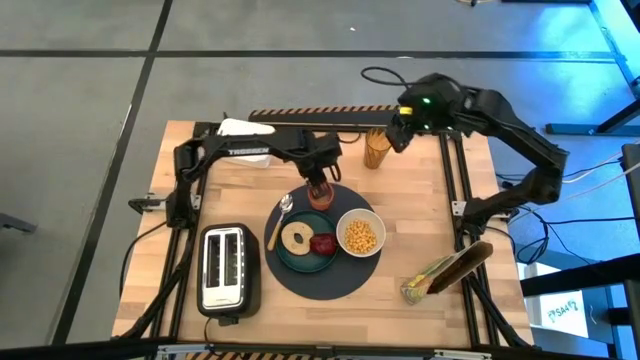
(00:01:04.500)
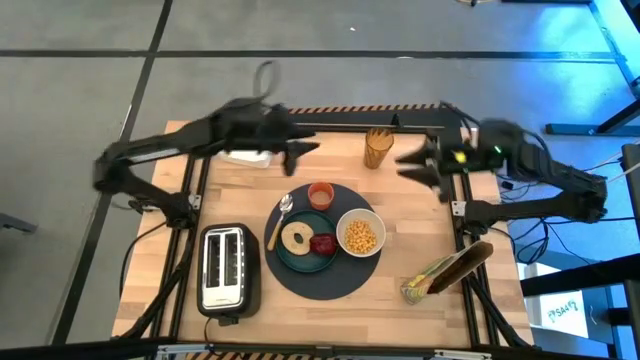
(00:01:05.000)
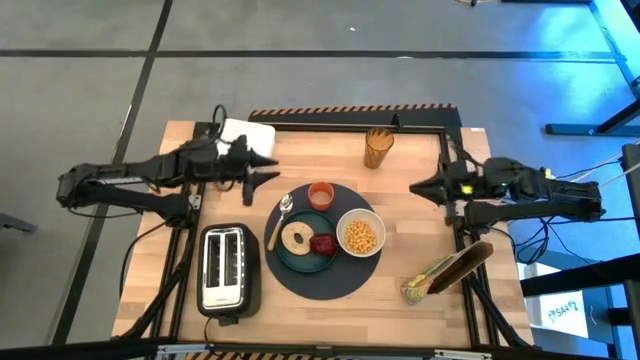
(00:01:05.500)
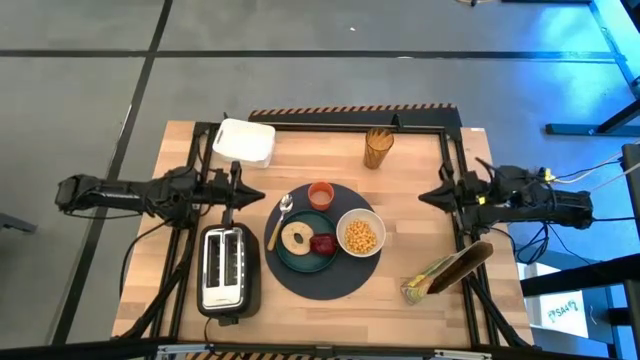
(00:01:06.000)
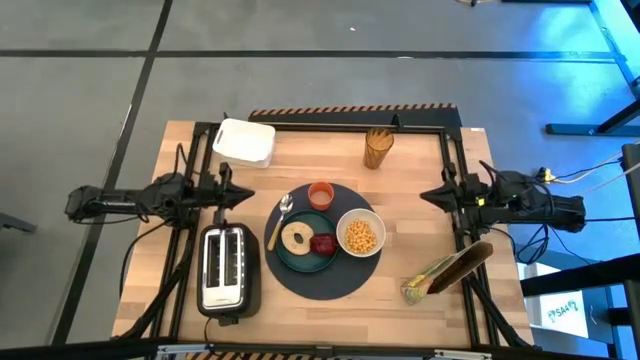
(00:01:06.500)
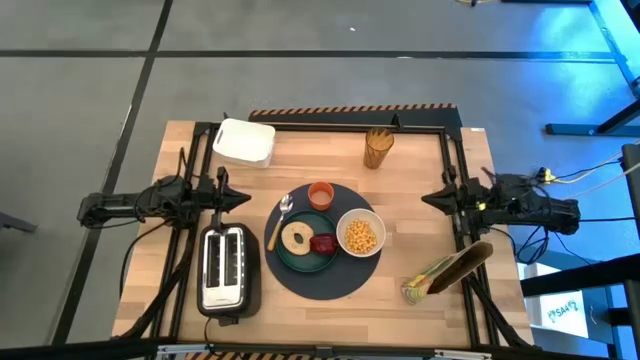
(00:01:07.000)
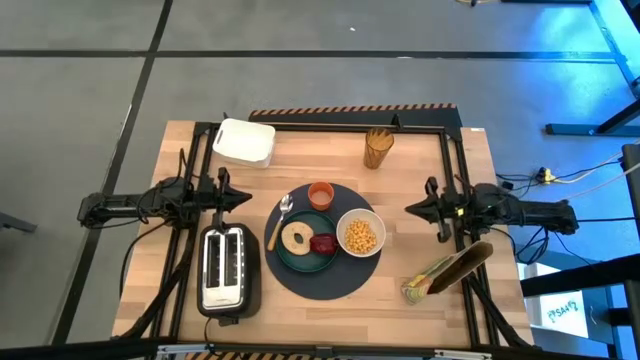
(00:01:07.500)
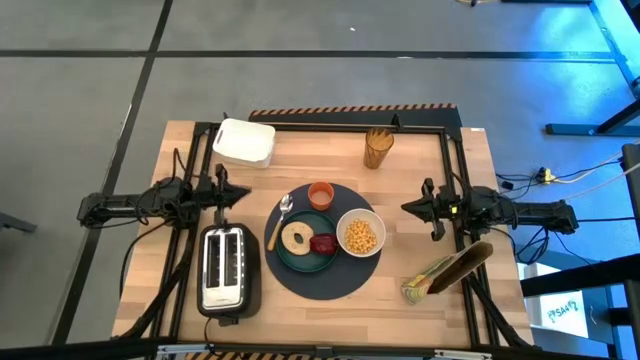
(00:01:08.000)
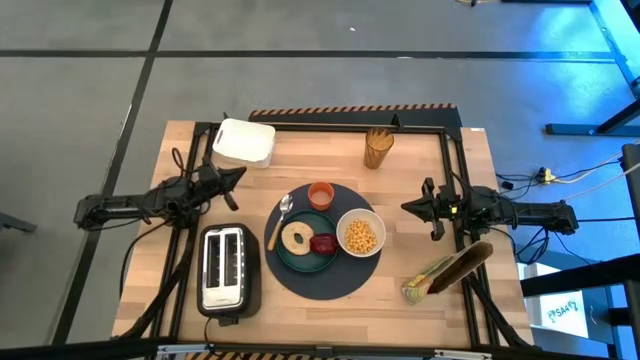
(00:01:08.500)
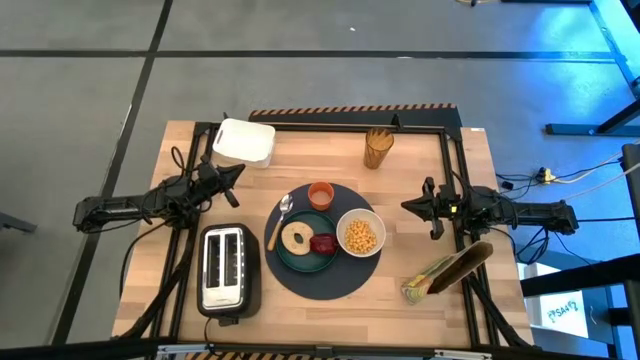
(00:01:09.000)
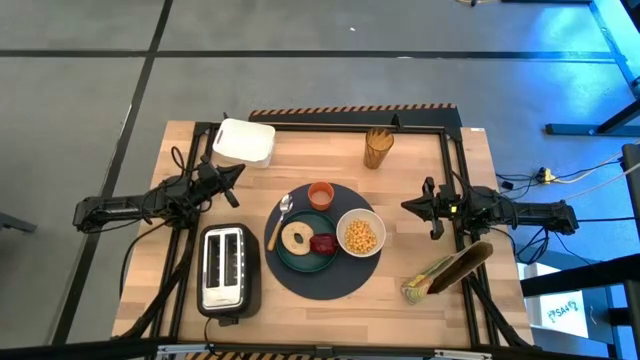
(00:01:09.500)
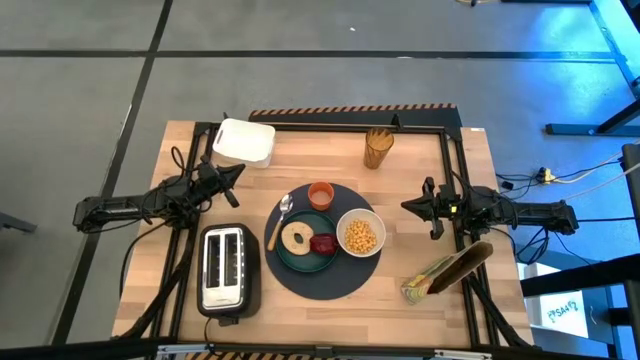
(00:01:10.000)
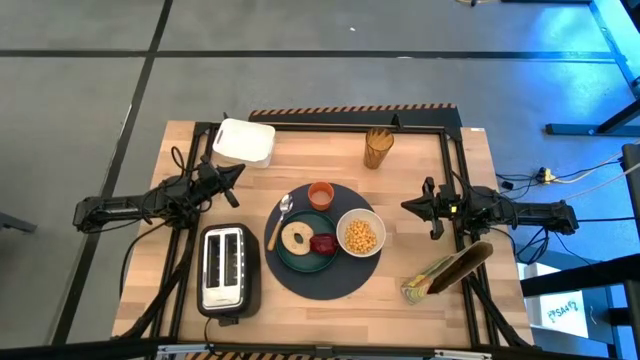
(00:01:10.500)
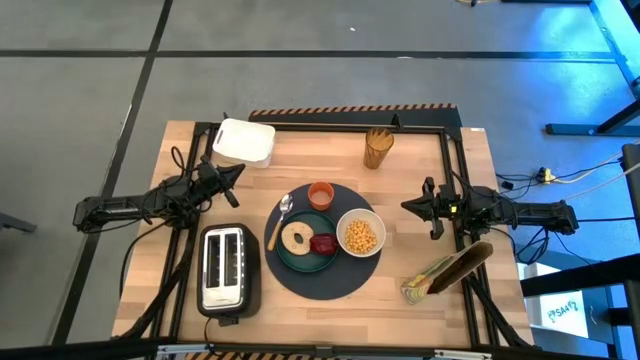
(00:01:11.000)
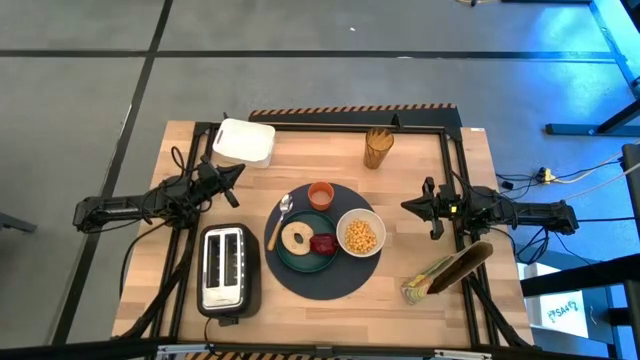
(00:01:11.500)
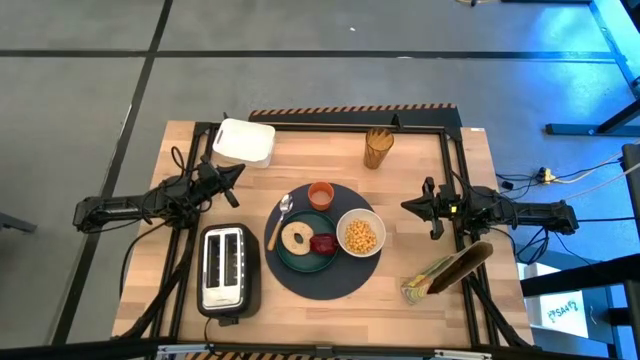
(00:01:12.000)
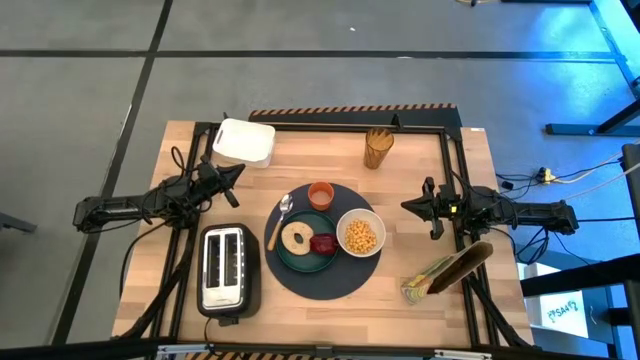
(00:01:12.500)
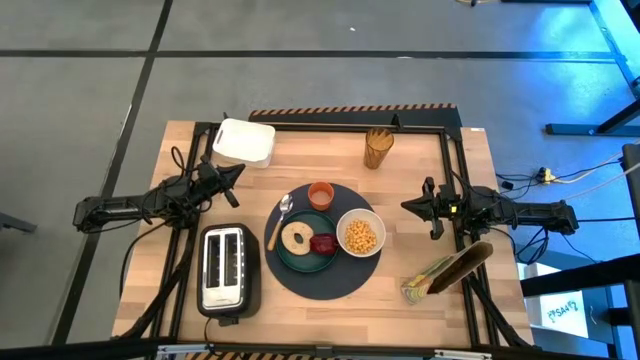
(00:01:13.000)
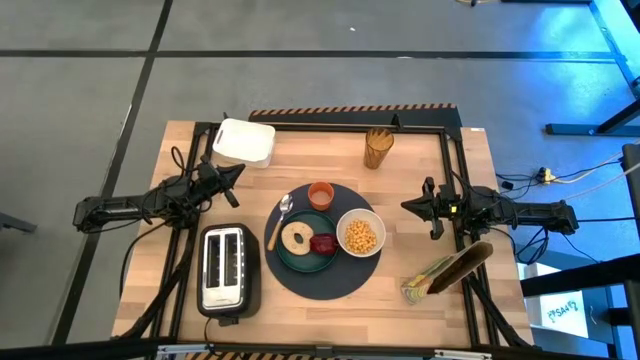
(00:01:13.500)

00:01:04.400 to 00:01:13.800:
Task: Arrange a breakfast setting
Return to Home Position

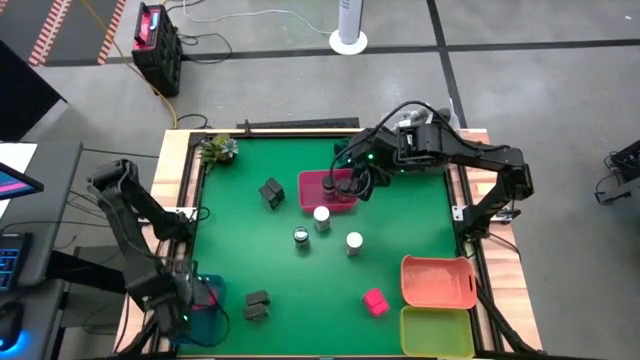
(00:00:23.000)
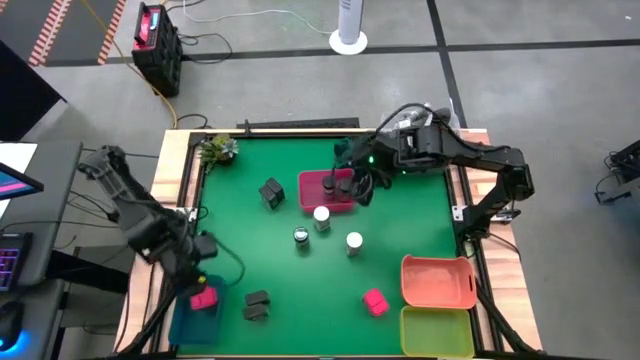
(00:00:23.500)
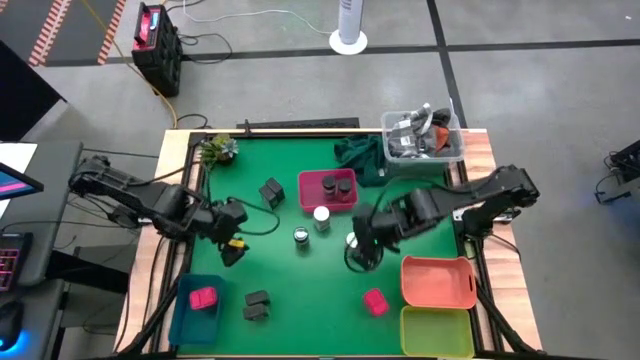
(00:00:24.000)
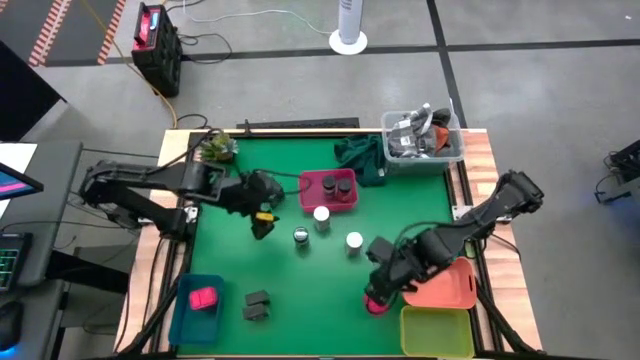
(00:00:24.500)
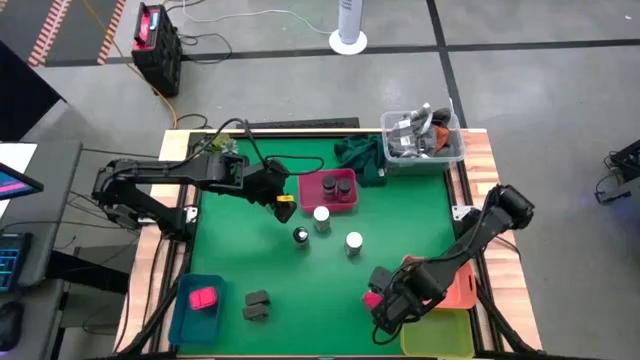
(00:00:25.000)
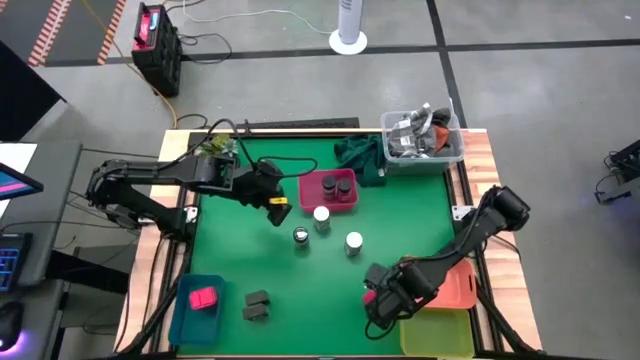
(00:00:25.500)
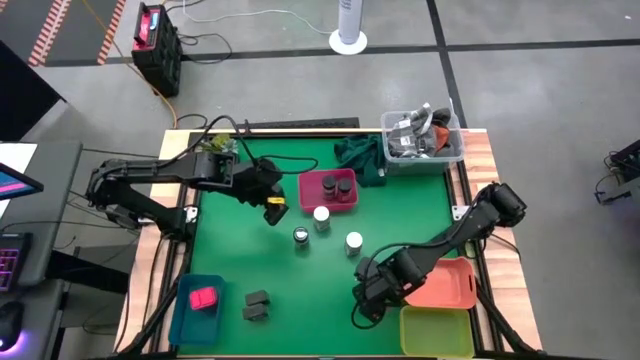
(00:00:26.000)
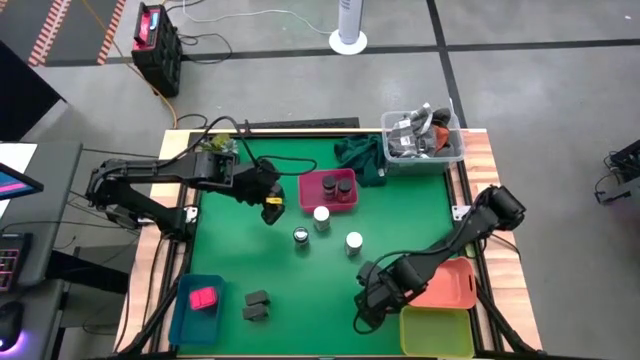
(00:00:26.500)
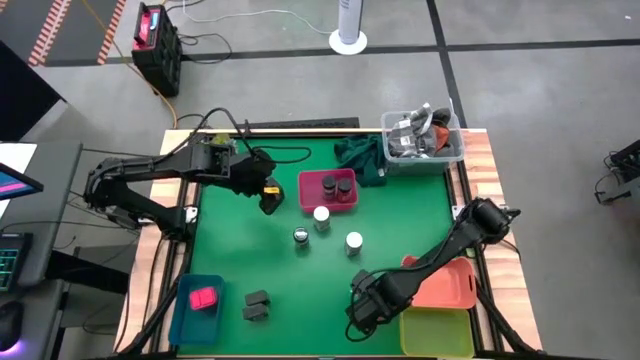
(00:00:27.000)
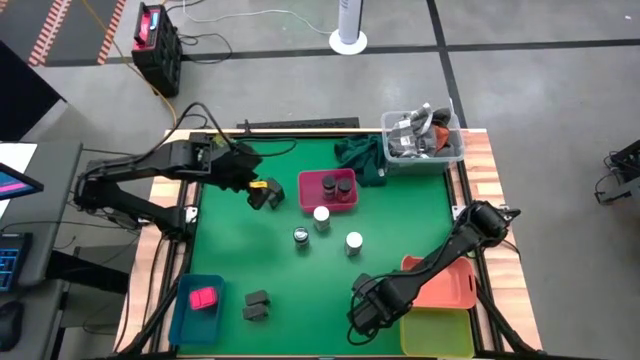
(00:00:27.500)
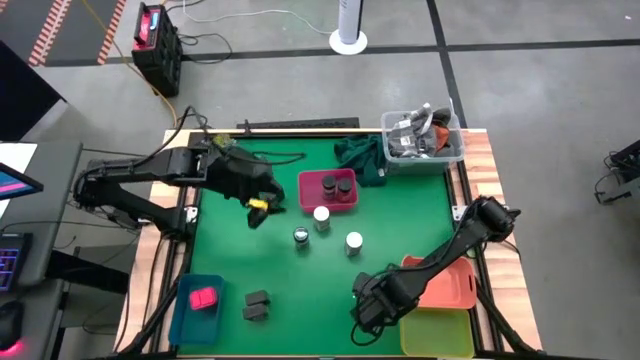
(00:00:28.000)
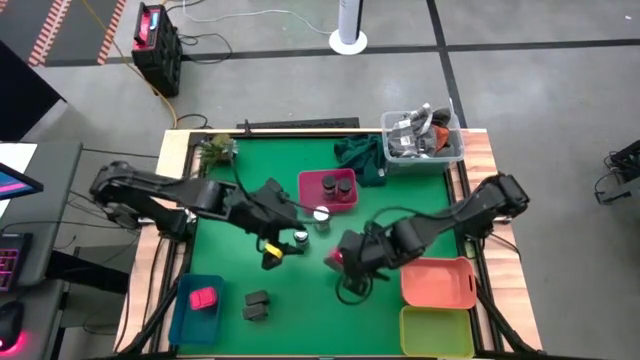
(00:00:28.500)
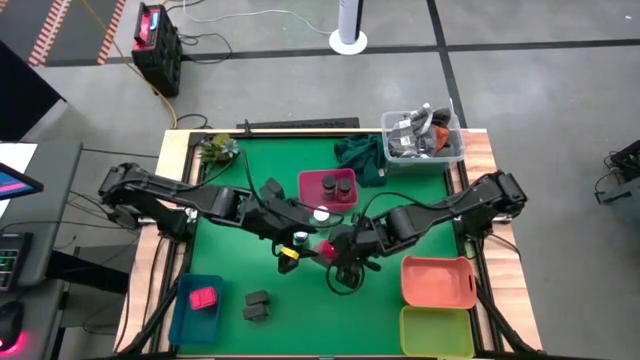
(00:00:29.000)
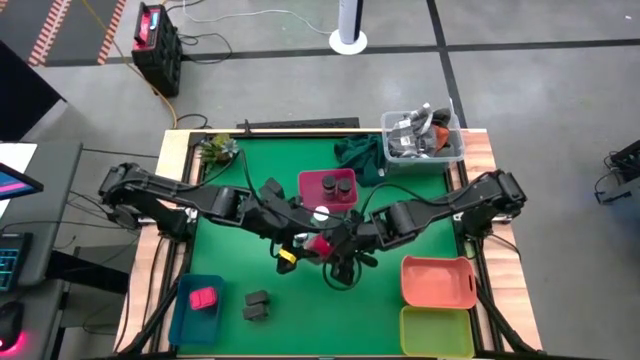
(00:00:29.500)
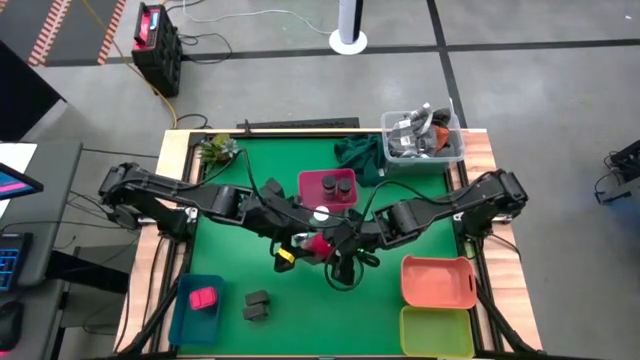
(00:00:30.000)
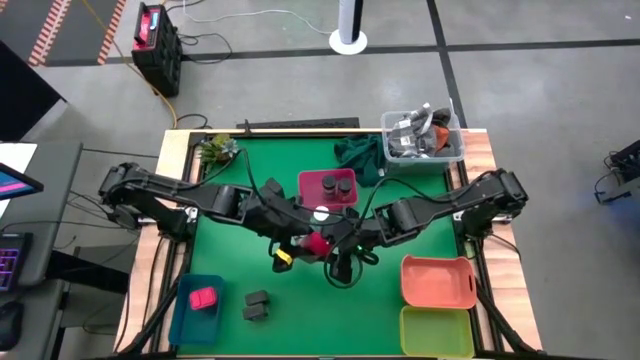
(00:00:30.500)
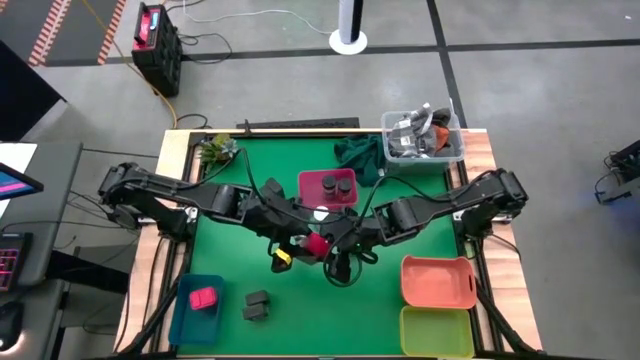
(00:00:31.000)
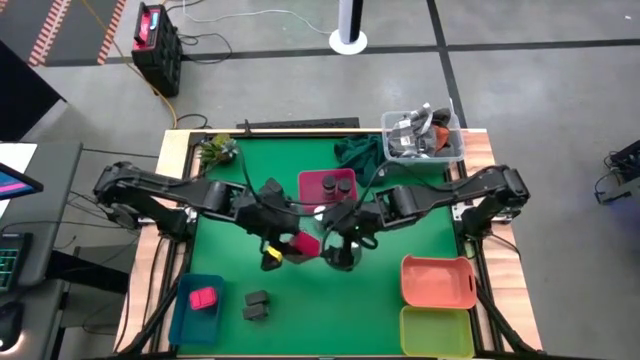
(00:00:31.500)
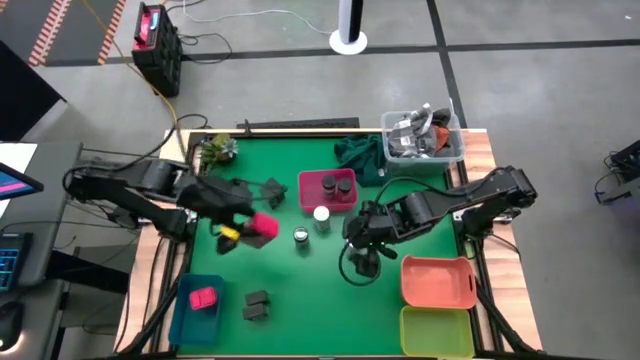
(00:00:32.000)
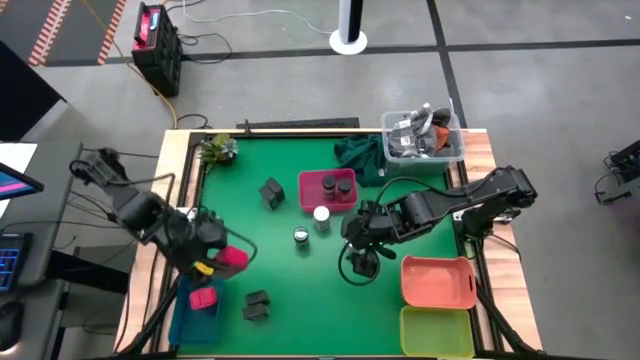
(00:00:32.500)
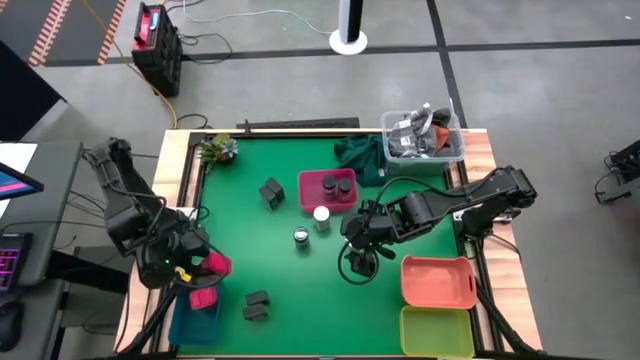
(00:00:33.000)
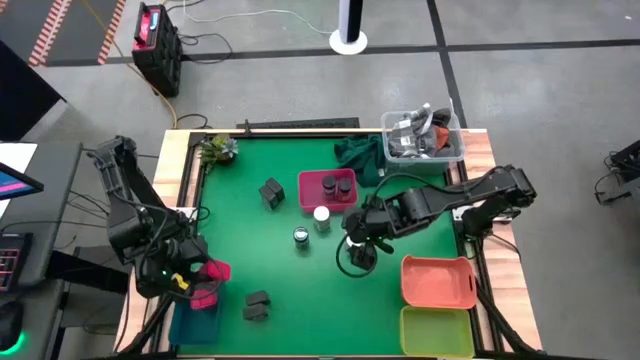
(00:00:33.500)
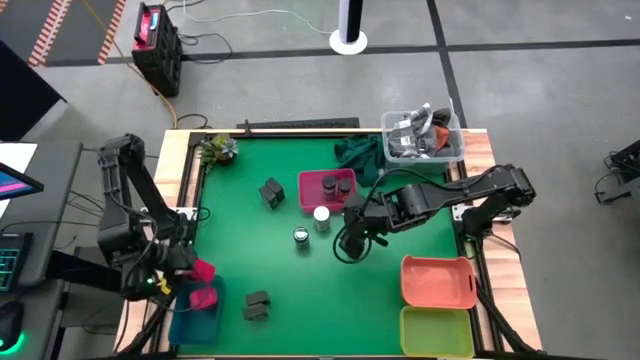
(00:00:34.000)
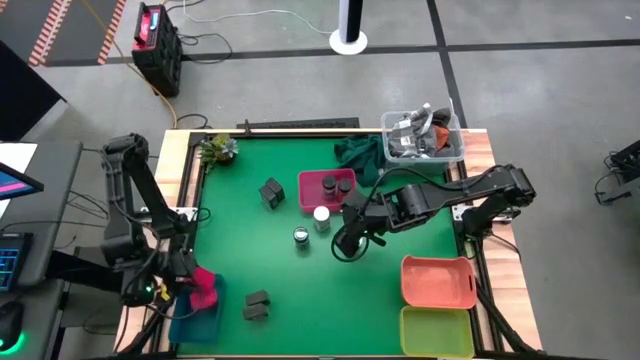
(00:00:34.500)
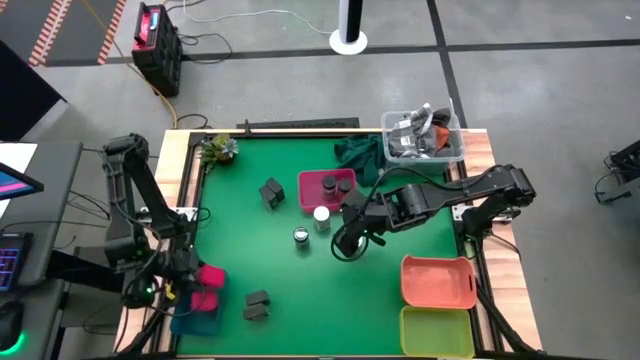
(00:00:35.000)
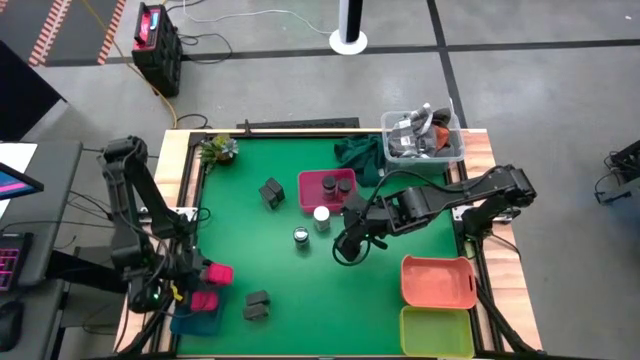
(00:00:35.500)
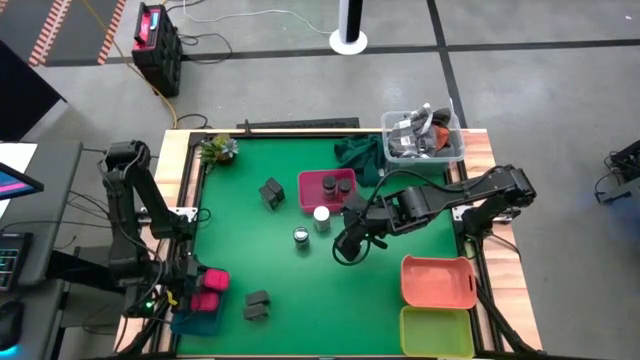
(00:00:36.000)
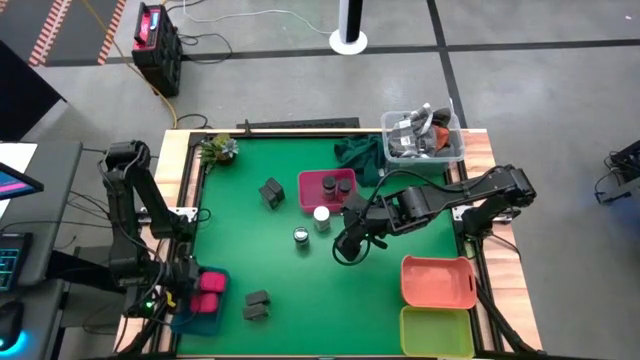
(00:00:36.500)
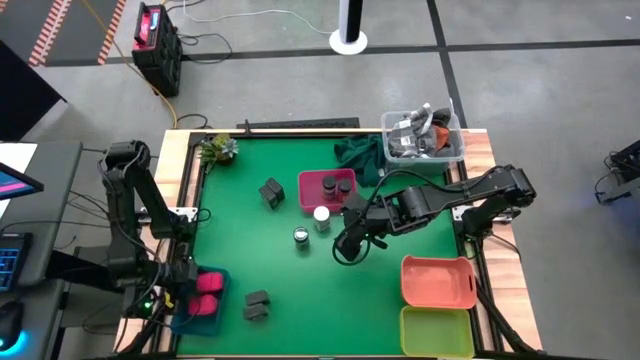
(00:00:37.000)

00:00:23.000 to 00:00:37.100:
Task: Sort spices by type
Put the red seasoning can into the blue bin
